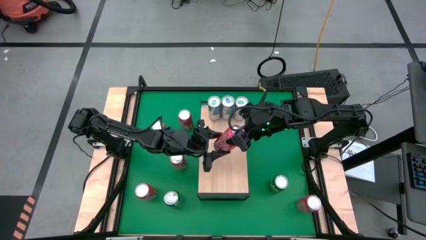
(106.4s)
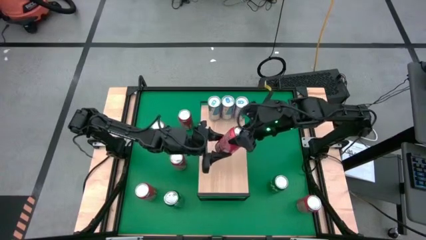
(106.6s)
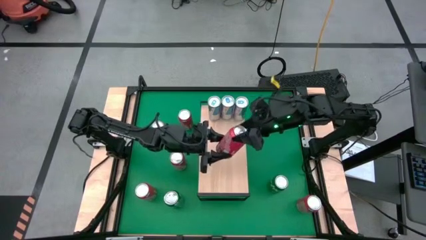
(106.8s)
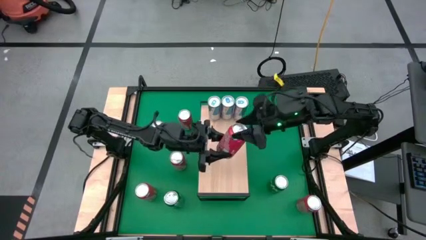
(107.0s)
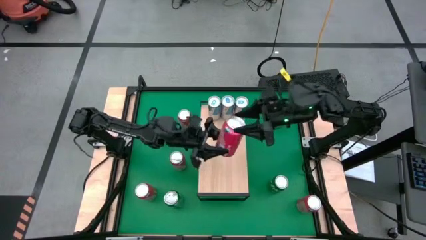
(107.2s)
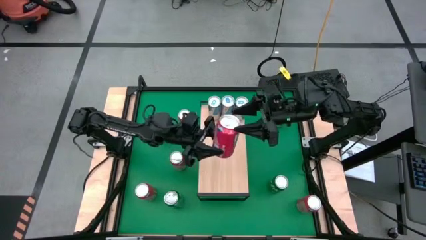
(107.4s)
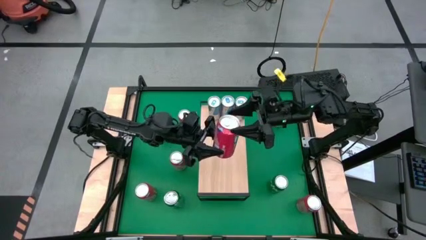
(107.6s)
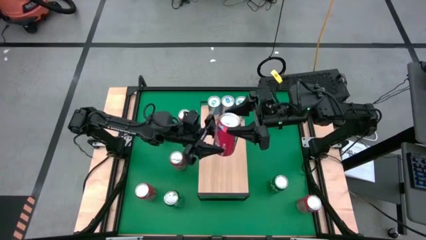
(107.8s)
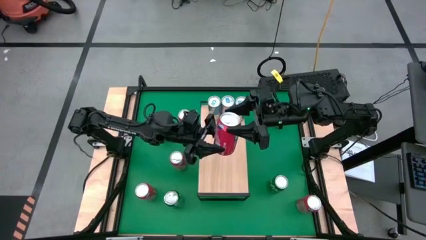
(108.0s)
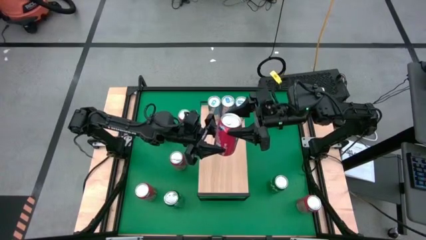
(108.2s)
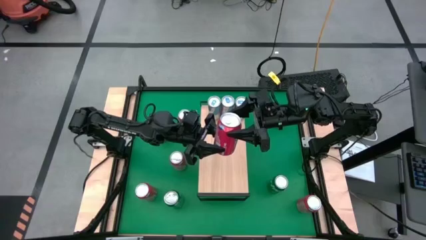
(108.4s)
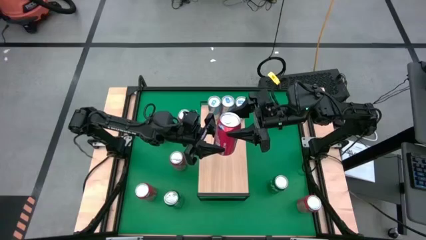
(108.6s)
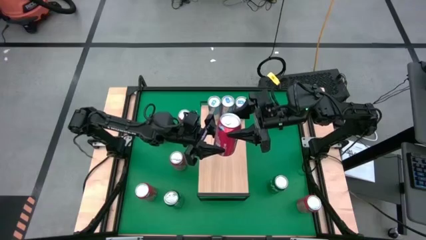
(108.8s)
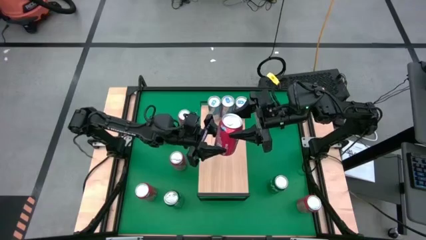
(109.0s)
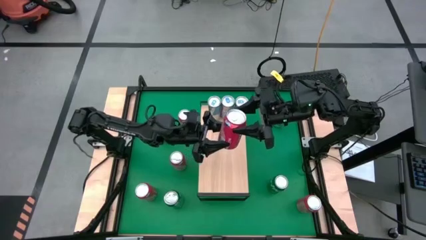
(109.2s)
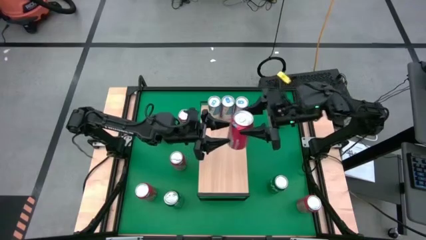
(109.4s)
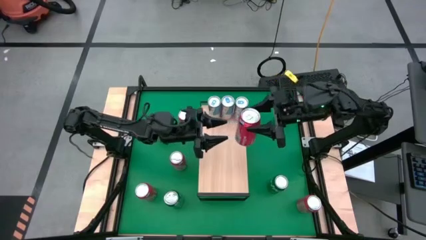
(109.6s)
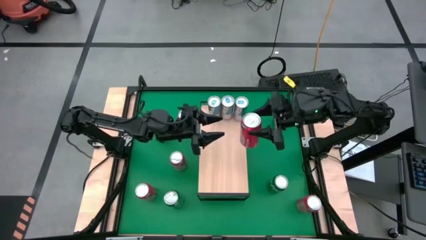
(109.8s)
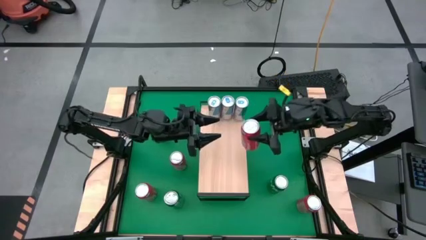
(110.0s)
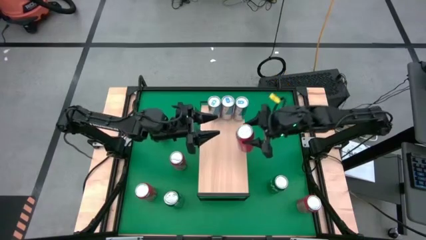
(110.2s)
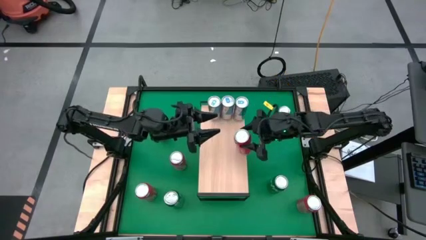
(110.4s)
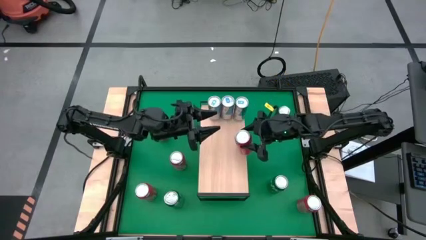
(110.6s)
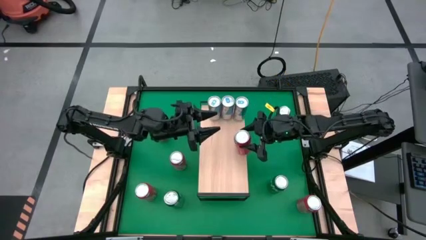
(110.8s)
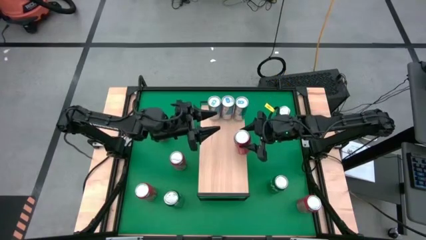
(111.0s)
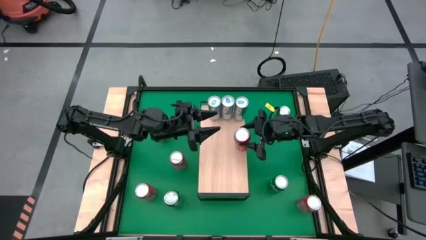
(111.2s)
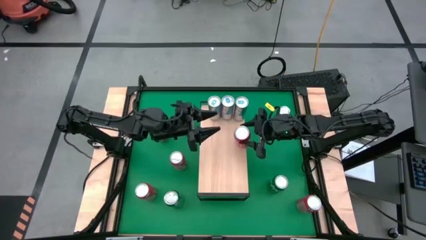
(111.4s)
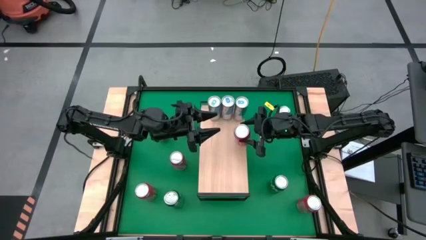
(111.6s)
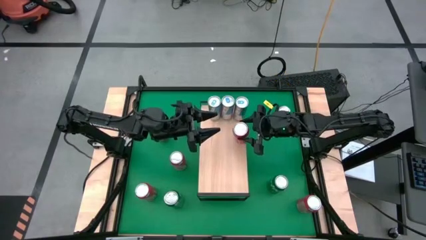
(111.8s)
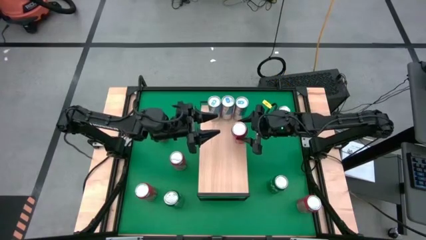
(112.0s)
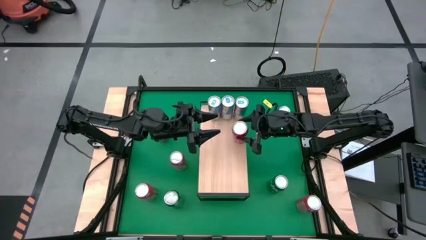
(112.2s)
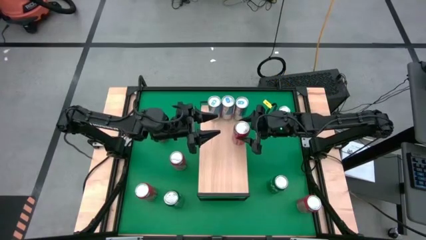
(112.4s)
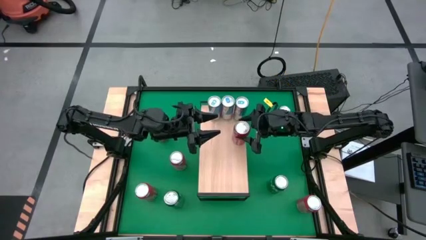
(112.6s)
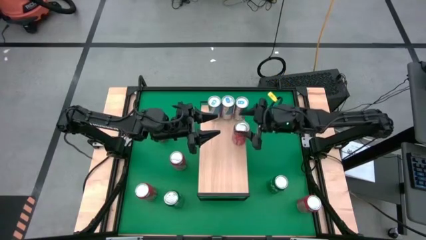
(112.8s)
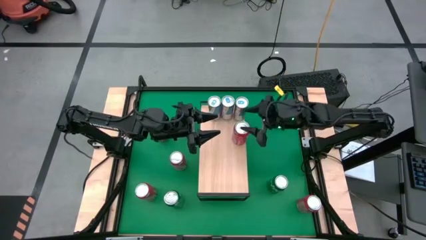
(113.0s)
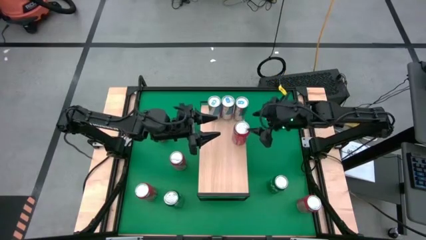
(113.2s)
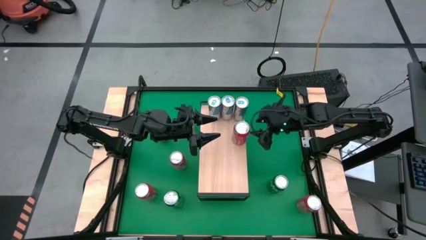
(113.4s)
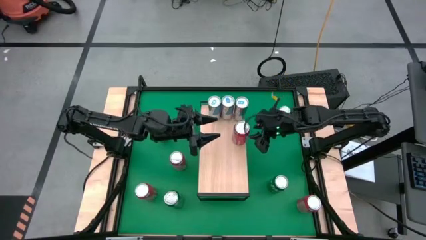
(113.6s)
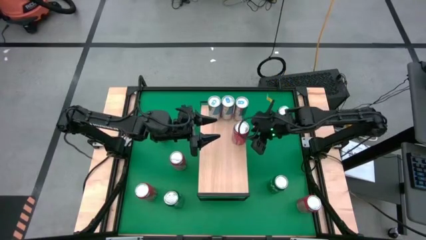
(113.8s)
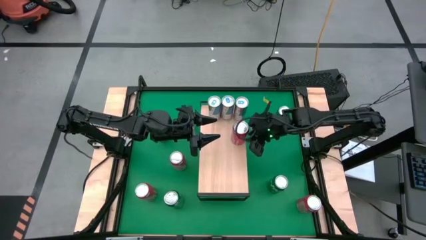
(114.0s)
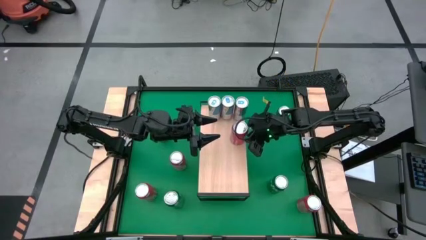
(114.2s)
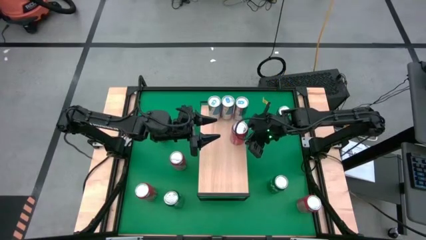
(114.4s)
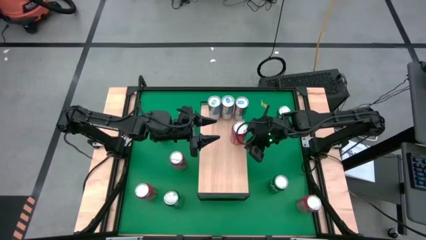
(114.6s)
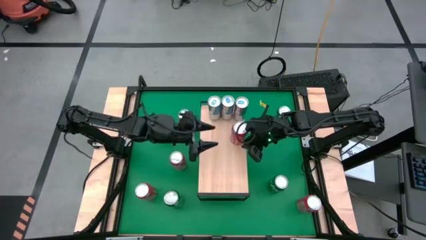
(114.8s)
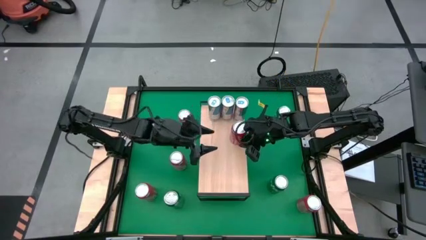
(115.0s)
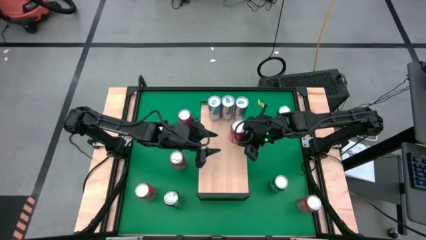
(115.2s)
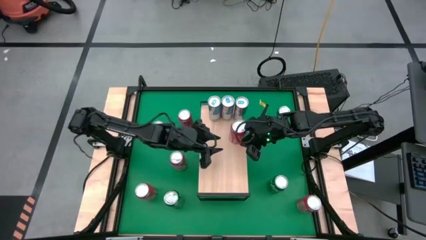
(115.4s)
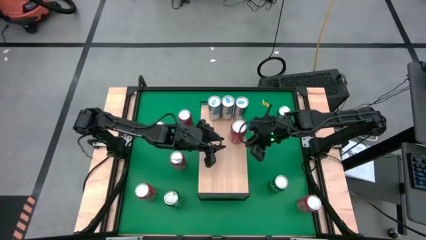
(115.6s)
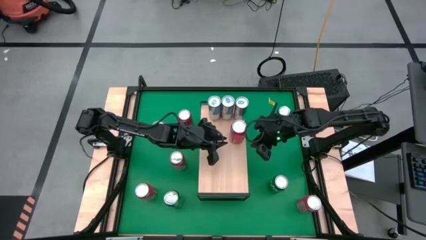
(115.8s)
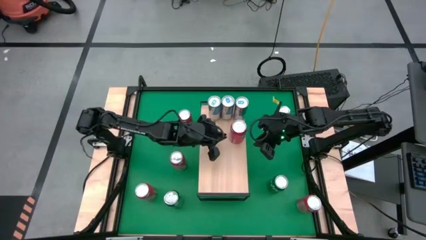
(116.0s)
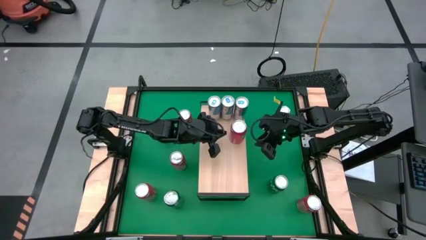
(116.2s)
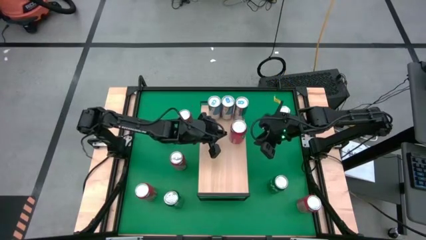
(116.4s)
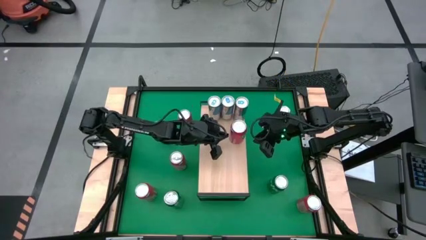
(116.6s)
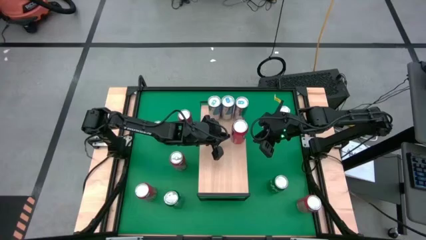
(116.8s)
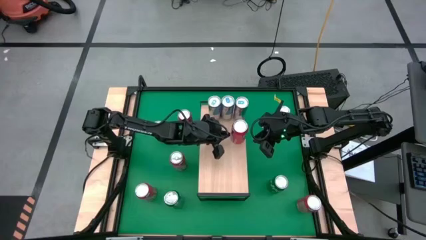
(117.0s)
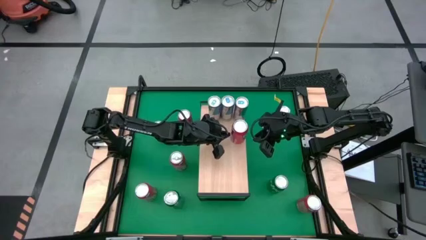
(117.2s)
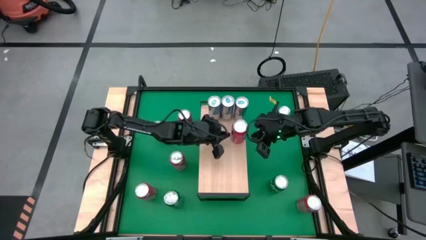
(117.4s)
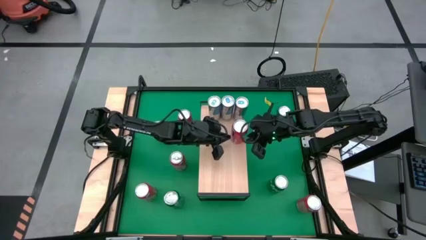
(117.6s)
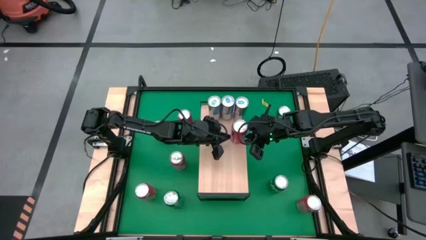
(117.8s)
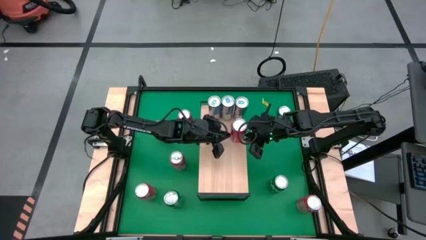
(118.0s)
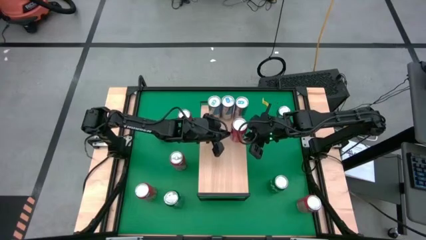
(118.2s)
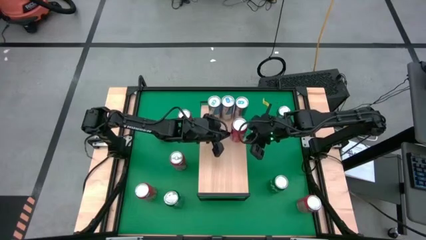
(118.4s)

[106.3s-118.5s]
Task: Place canned beverage on shelf
Put the orange soda can on the shelf

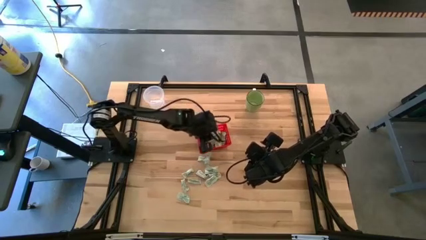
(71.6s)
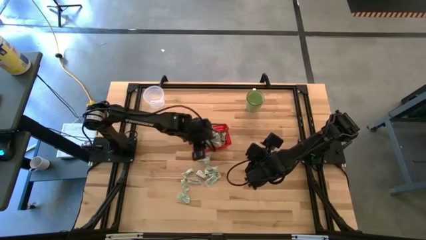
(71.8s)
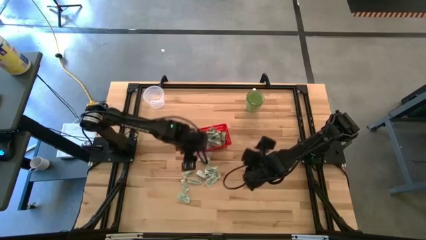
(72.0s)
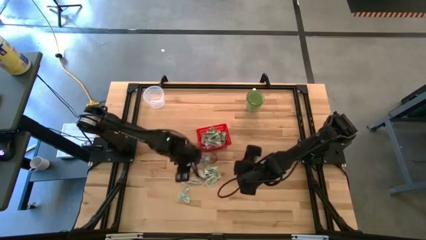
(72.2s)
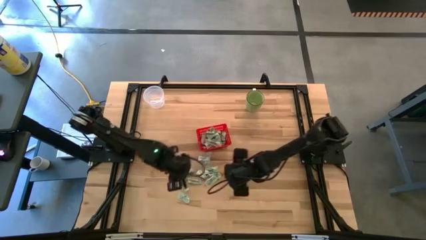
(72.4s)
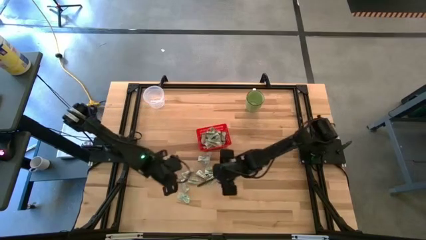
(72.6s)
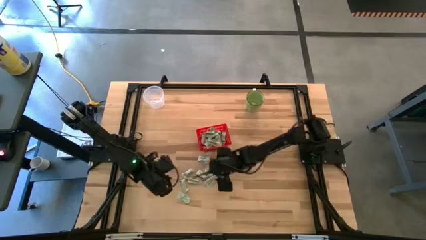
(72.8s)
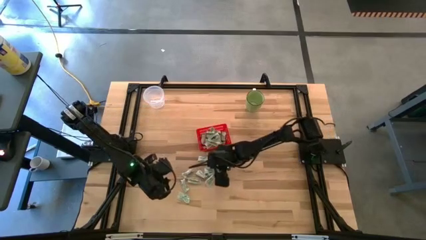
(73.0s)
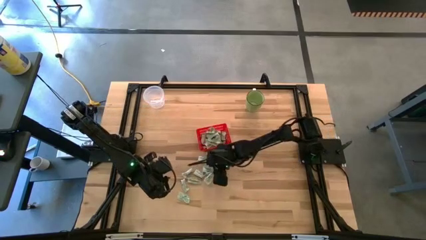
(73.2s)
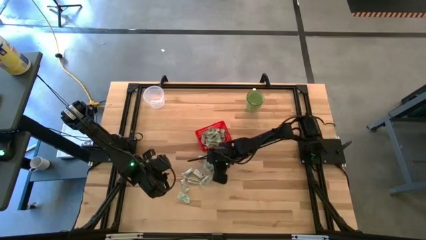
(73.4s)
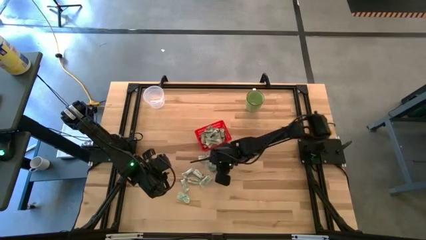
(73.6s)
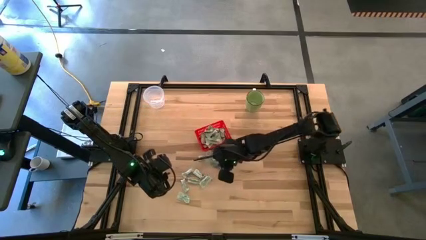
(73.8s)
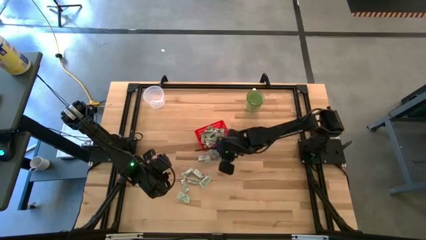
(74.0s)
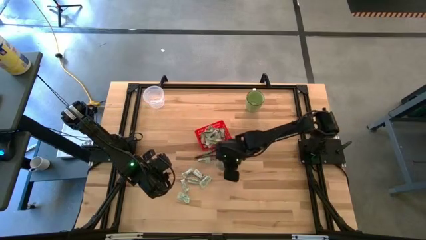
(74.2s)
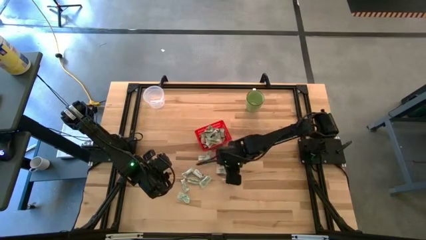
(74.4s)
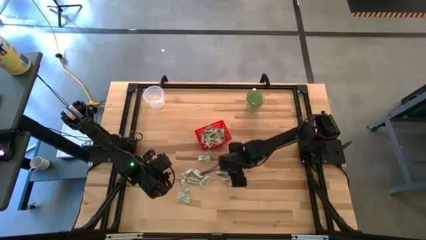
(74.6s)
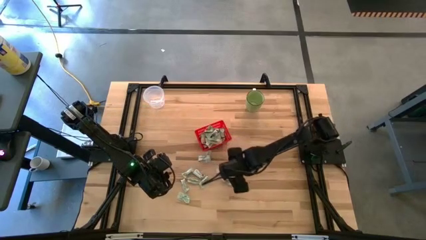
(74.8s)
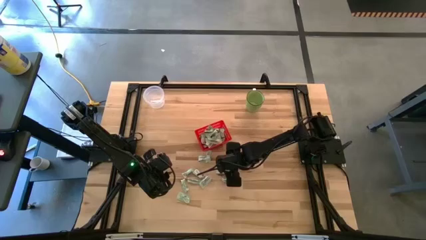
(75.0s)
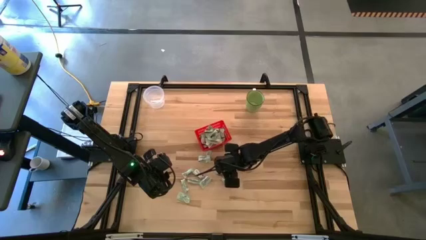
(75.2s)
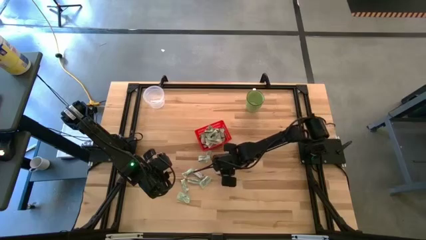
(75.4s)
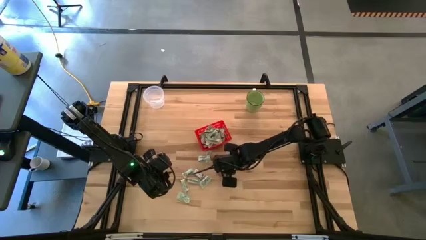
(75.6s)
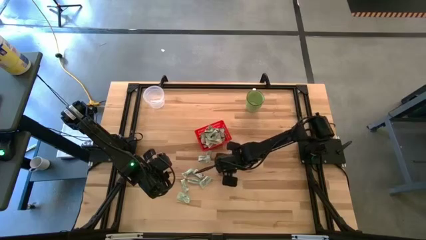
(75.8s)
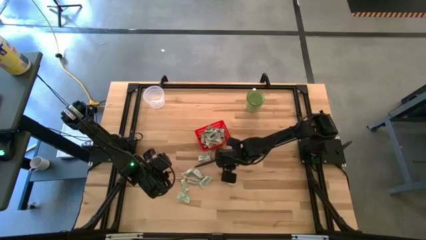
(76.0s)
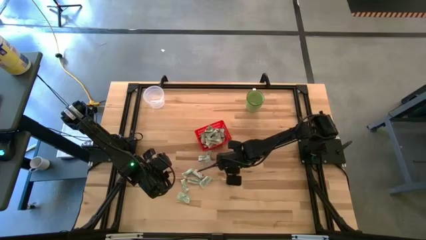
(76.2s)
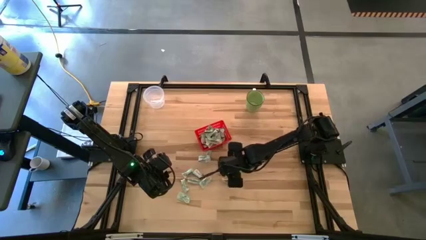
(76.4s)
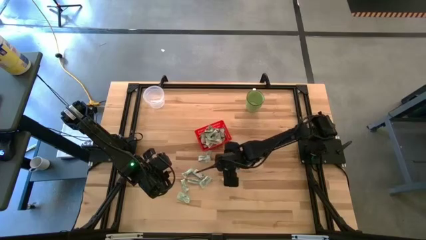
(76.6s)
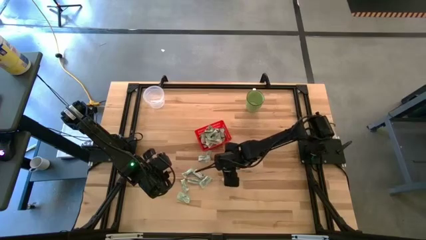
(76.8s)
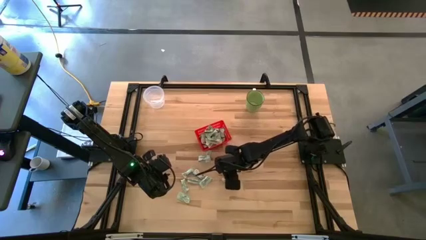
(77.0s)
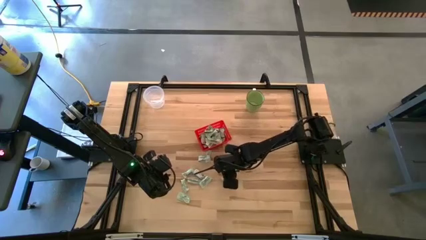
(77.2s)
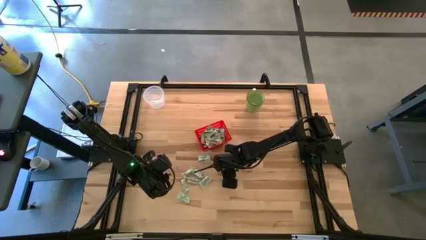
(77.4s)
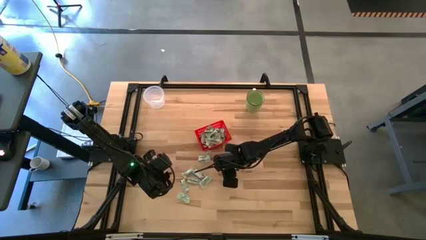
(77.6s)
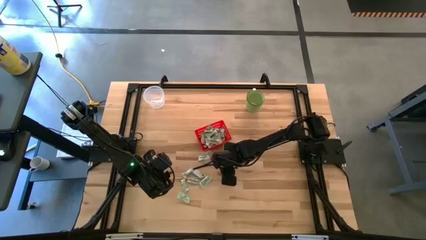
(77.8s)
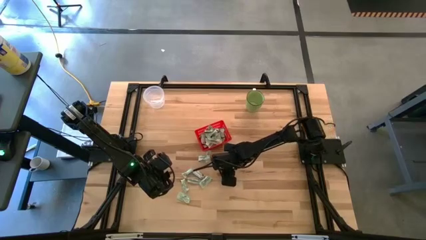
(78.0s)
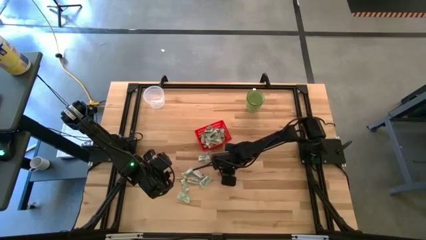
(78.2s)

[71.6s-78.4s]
Task: Pick and place Stevia / Truvia into bins
Put the stevia packet into the red basket
